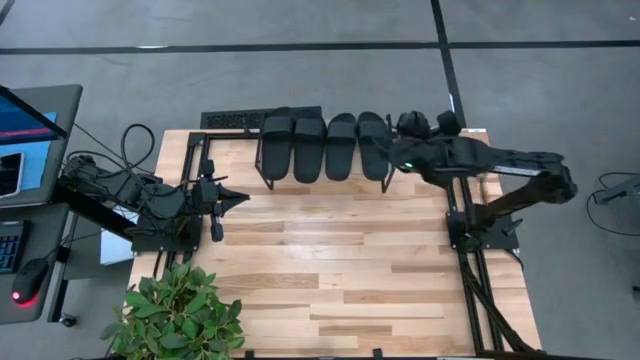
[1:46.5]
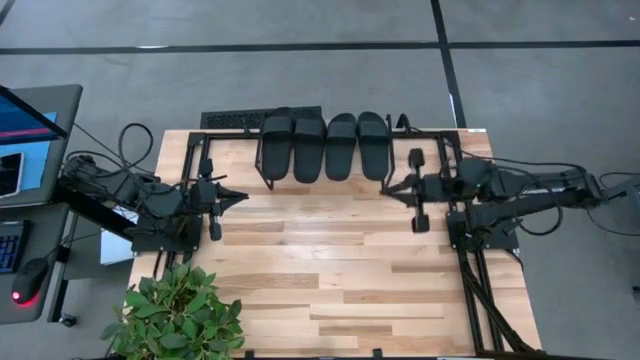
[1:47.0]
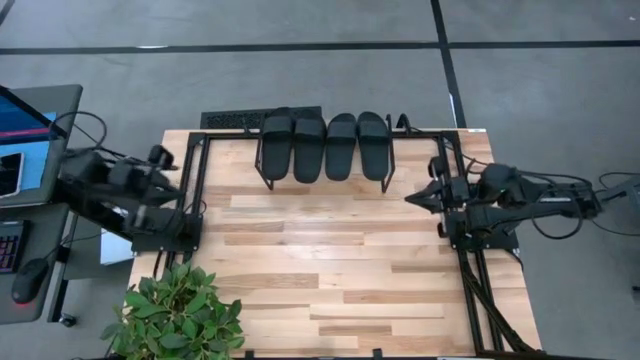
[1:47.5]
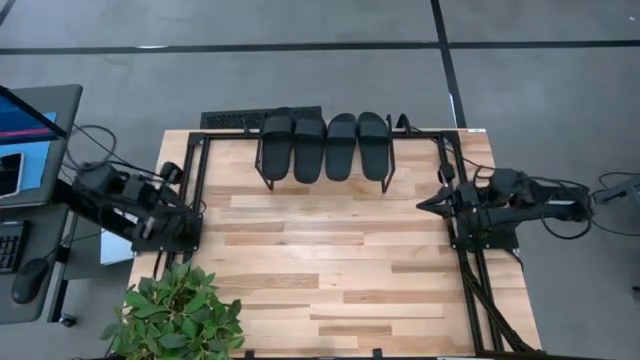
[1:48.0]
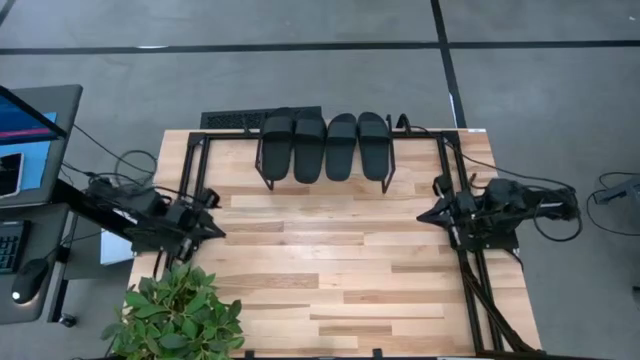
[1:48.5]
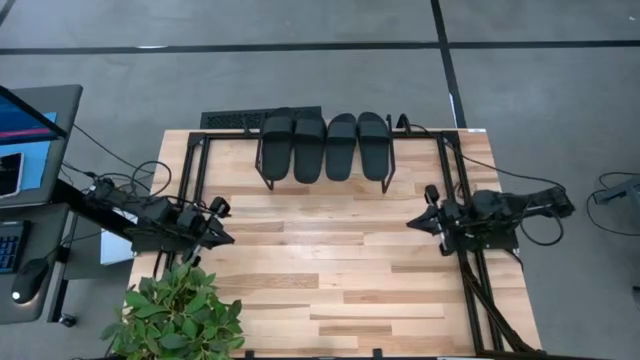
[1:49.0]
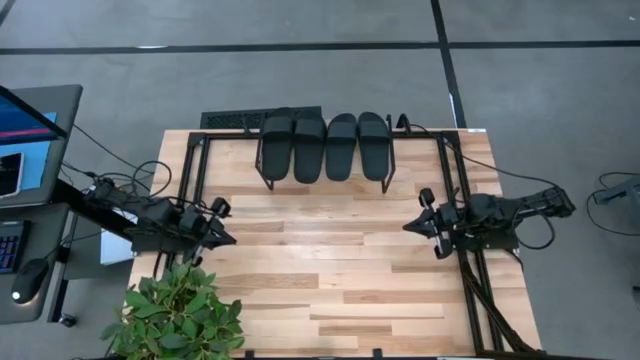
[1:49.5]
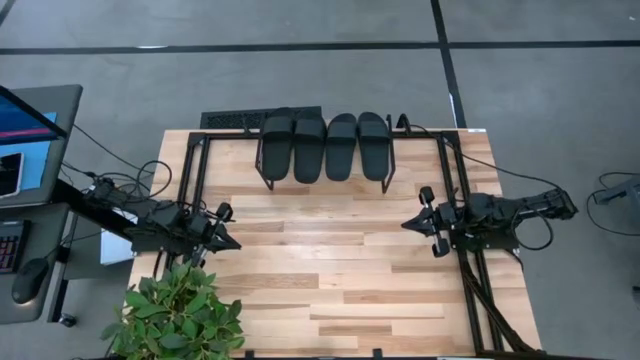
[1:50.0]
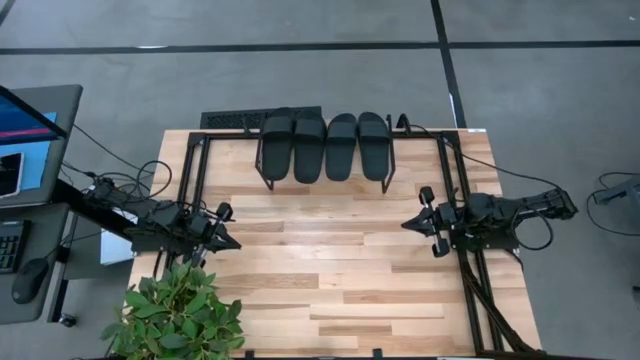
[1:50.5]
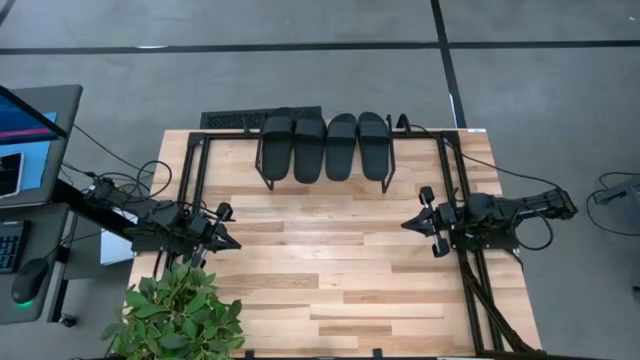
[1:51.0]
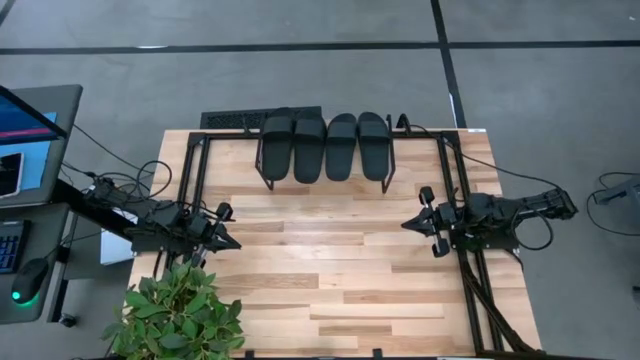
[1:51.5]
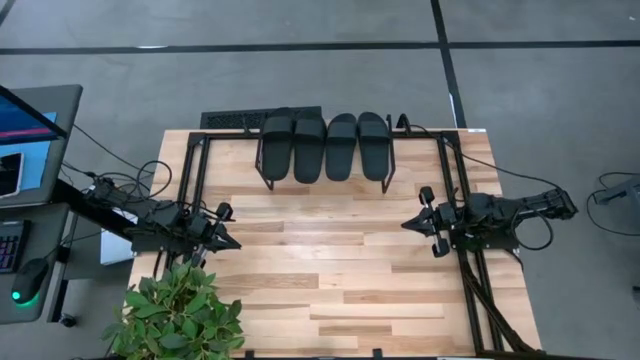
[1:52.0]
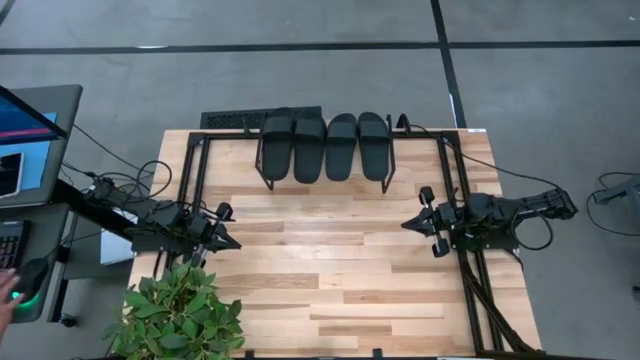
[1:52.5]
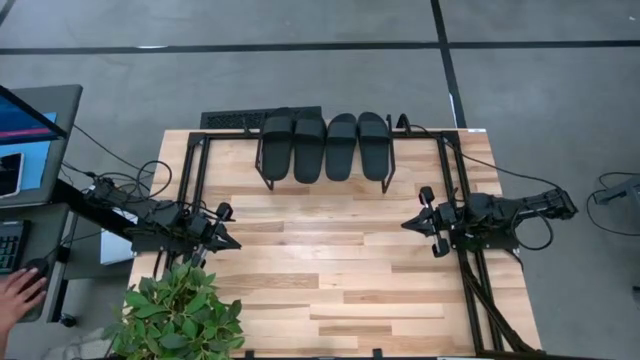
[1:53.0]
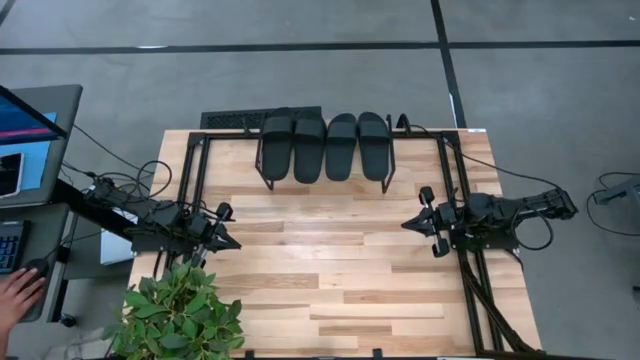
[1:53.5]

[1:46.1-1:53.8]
Task: Pick and place slides into the shelf
Return to Home Position

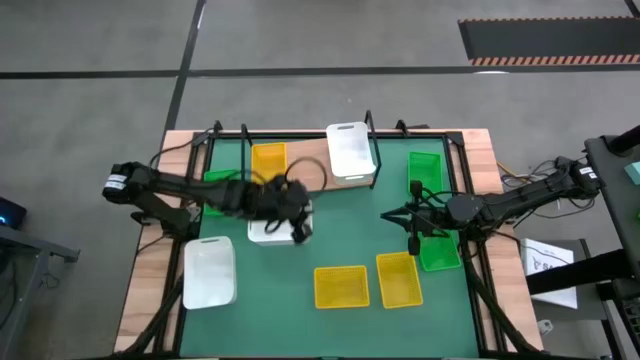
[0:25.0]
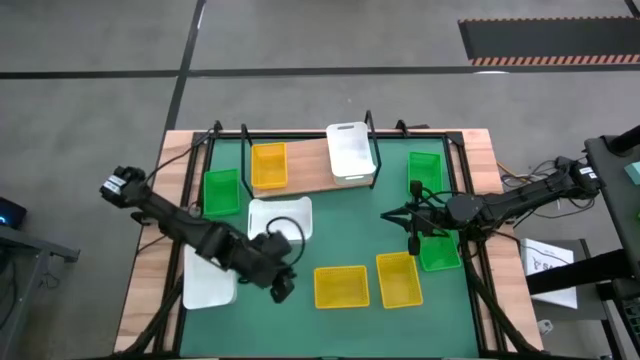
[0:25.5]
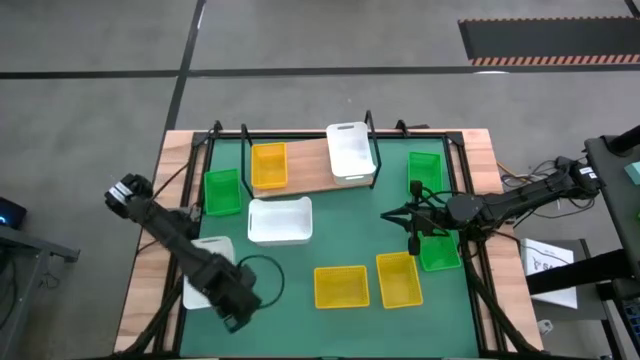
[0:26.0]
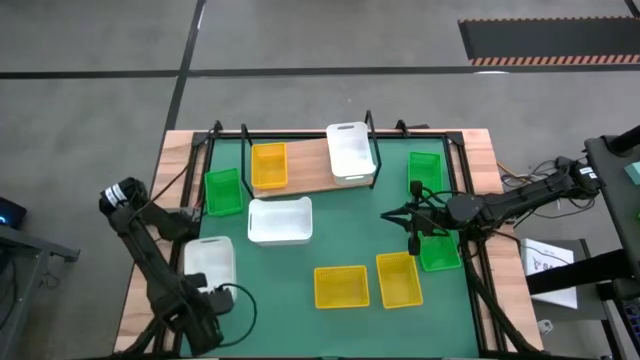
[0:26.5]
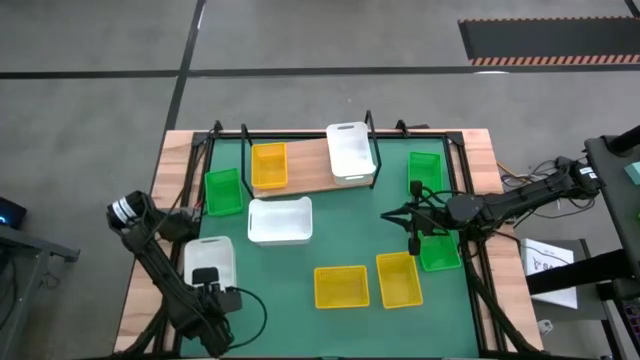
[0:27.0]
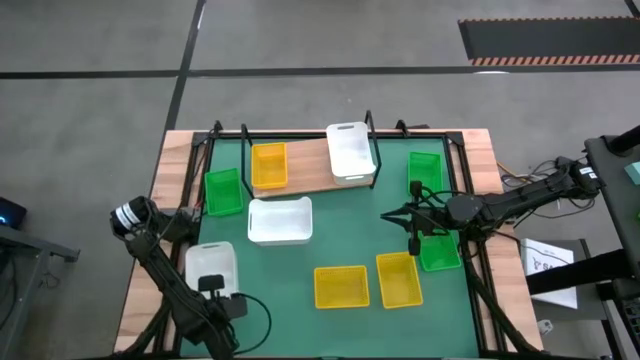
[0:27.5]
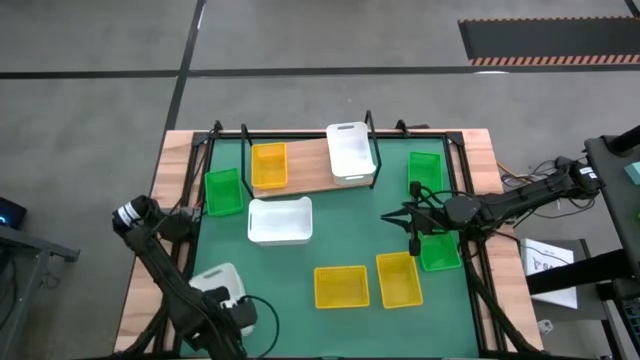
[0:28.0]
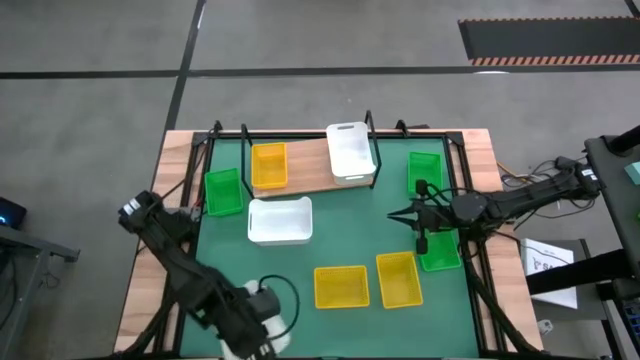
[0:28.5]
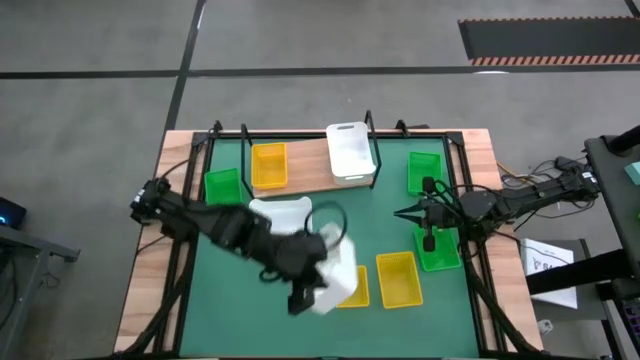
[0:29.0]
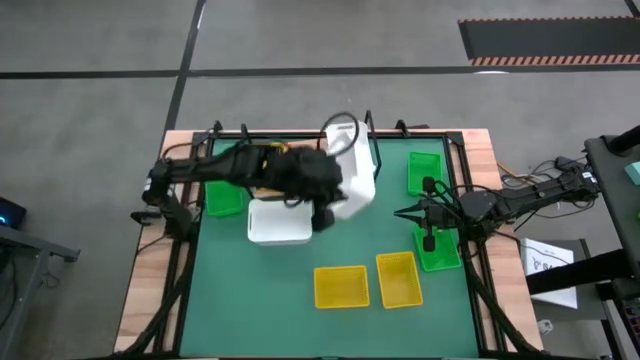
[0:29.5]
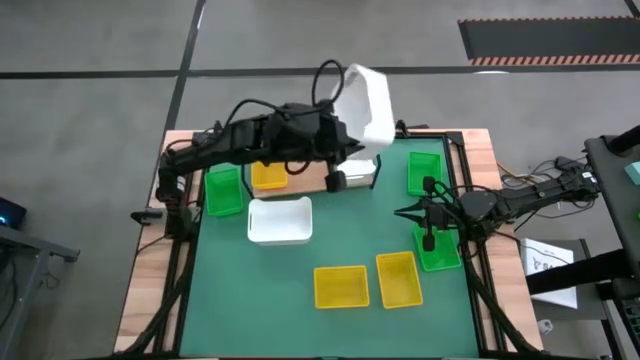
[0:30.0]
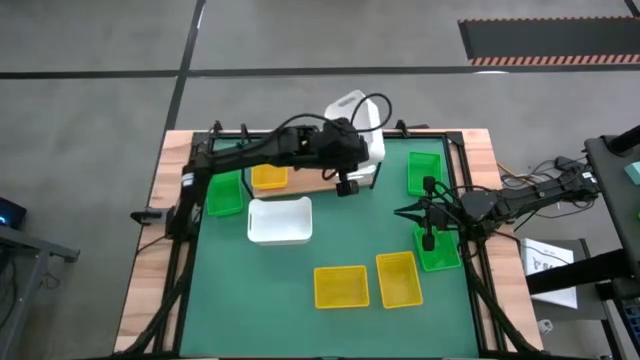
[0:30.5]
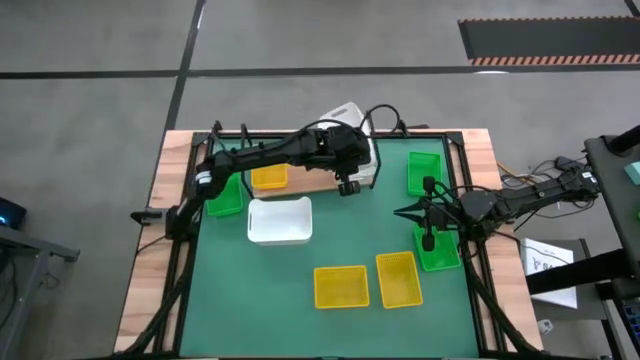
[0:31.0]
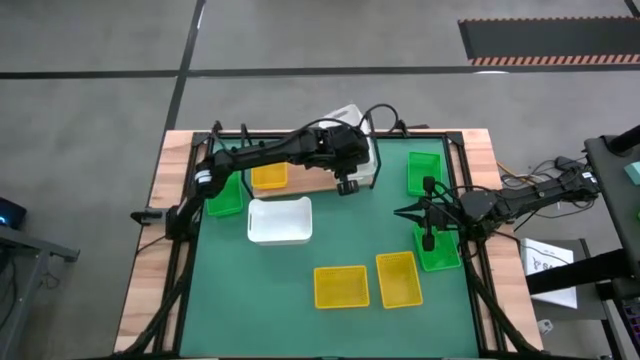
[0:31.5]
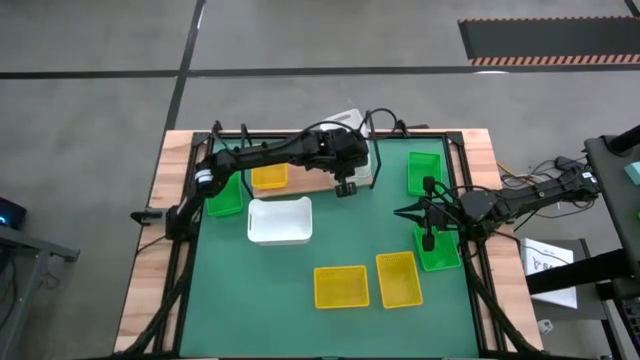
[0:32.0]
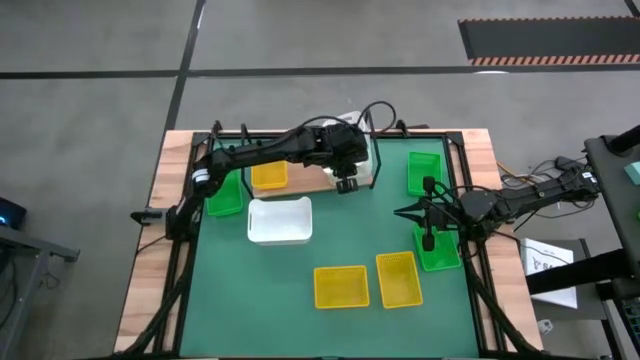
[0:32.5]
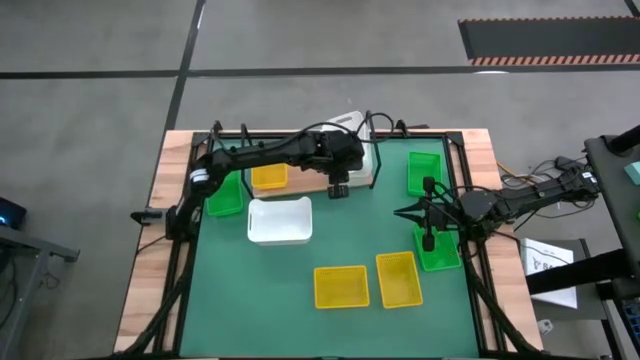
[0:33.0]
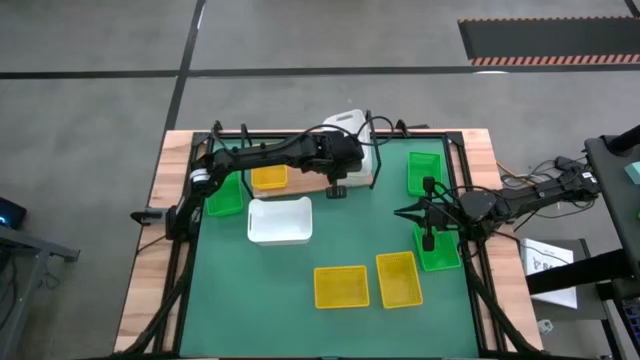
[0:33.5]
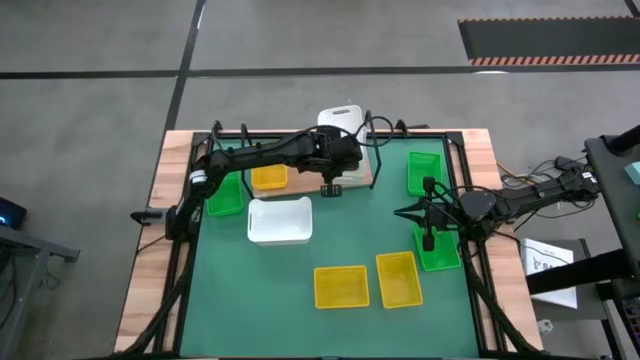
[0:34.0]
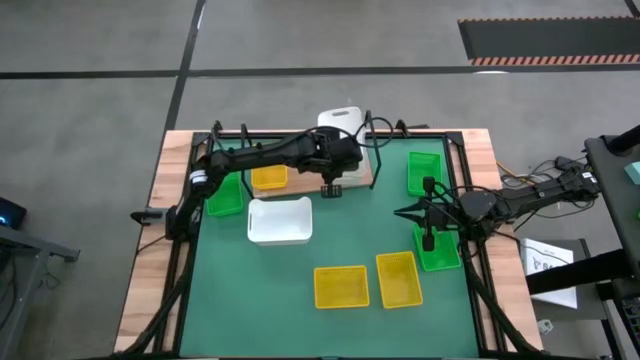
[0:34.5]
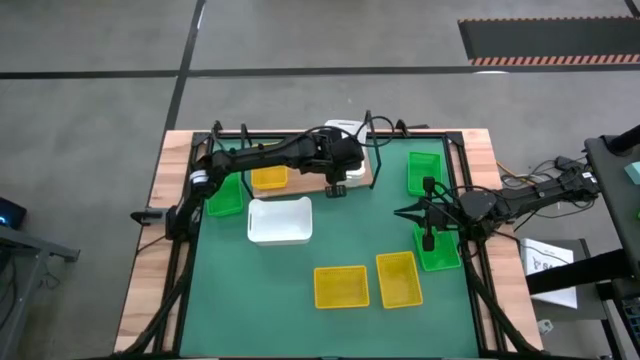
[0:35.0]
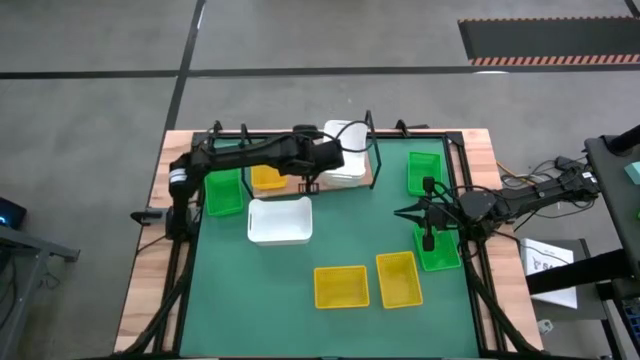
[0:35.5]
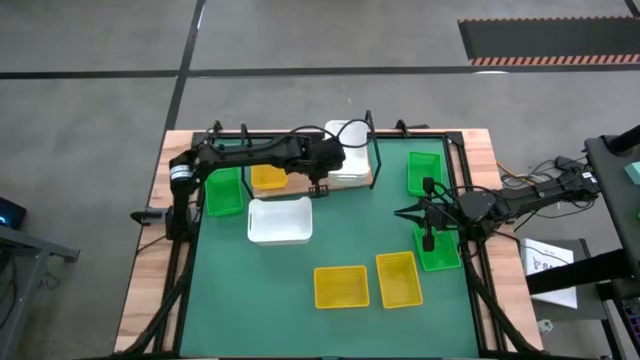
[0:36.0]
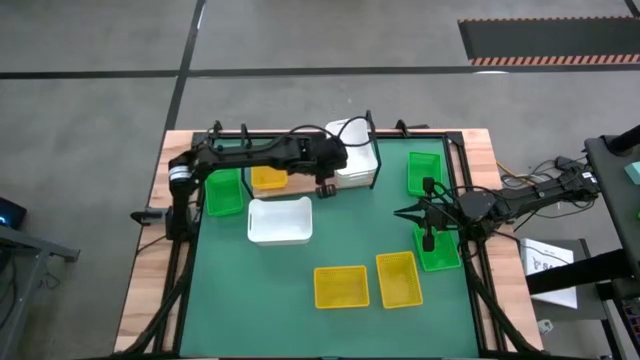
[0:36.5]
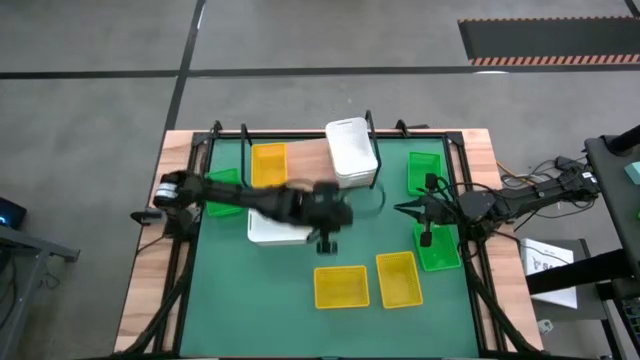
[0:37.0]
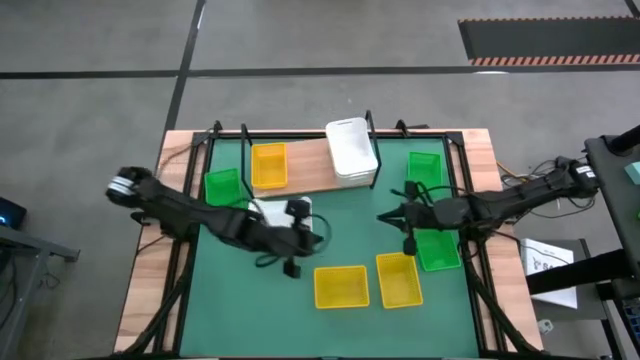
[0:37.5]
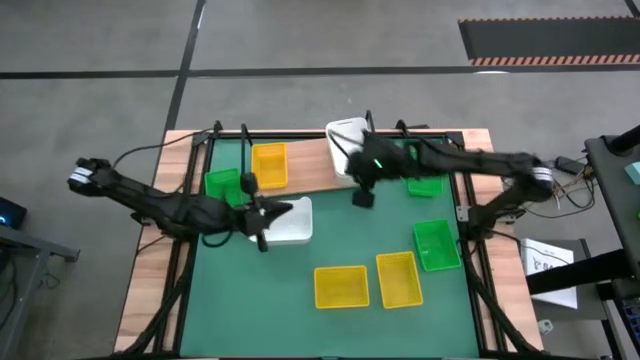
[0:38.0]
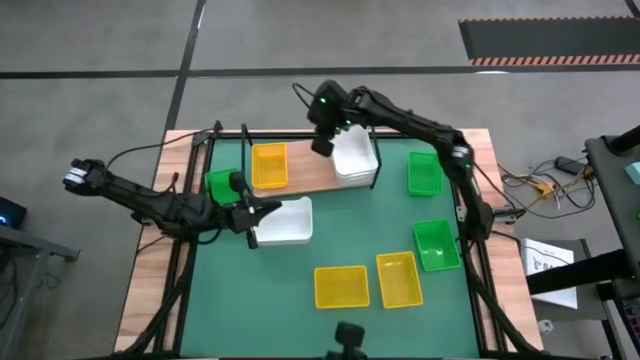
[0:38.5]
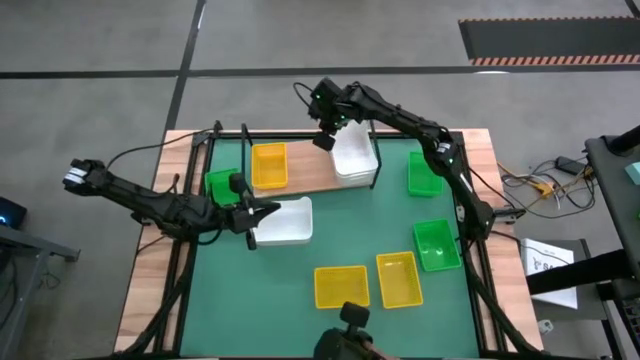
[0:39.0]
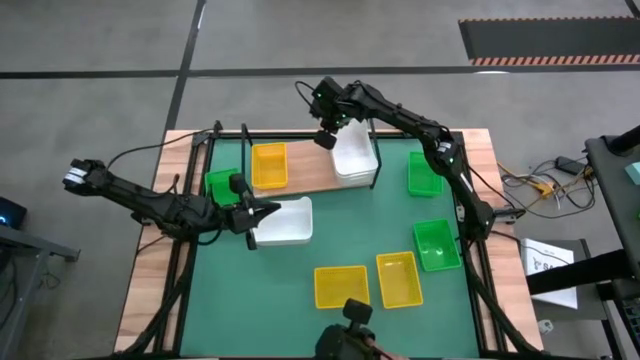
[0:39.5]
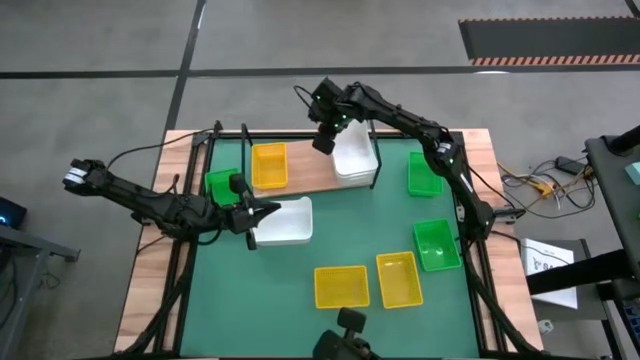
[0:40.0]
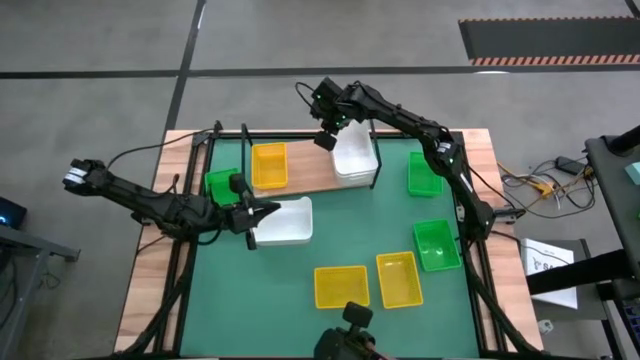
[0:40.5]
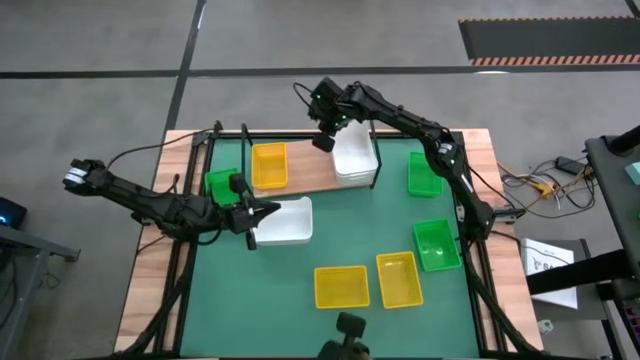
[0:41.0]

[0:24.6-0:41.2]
Task: Stack baskets on shelf by color
Stack the bottom white bin on the white bin on the shelf
